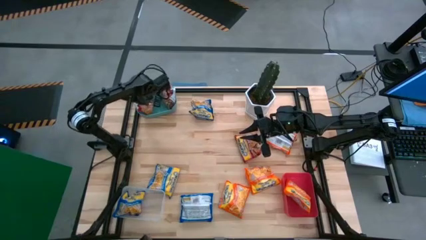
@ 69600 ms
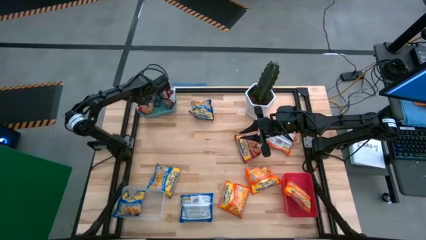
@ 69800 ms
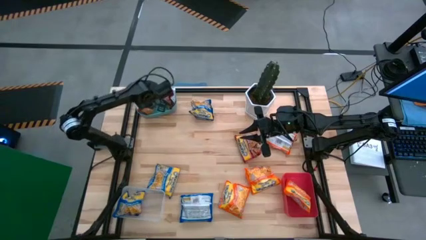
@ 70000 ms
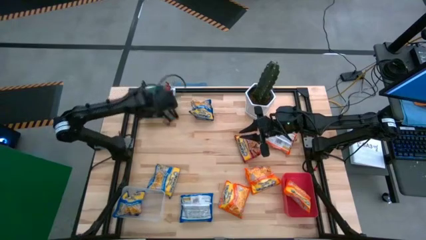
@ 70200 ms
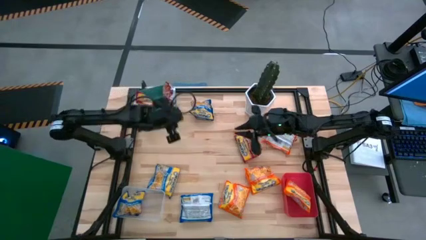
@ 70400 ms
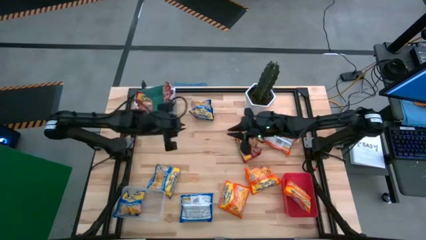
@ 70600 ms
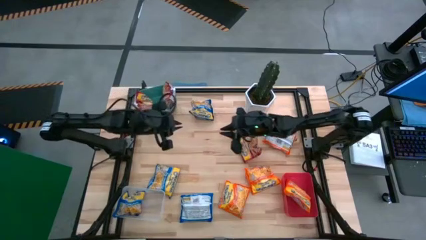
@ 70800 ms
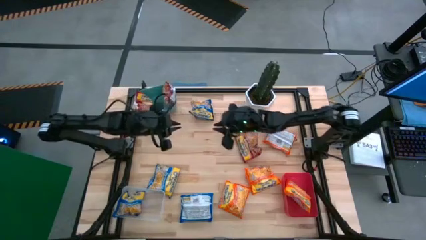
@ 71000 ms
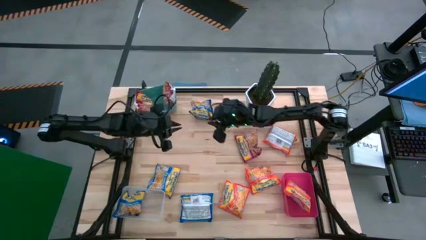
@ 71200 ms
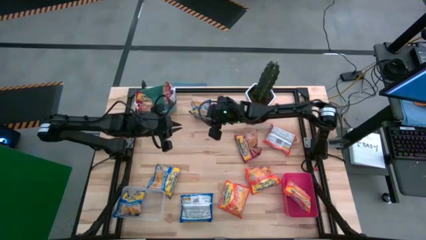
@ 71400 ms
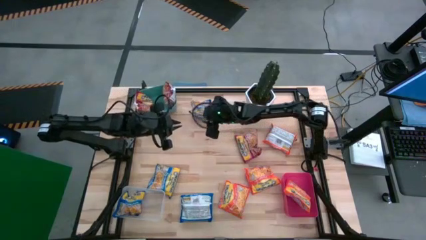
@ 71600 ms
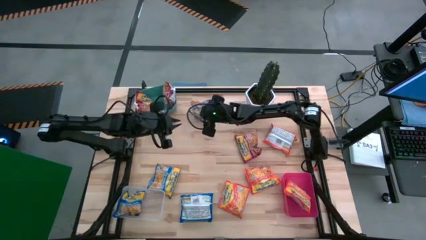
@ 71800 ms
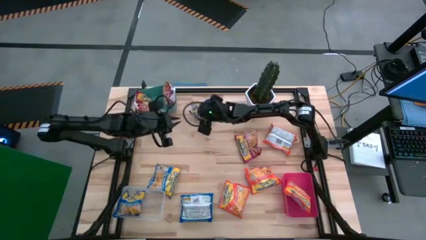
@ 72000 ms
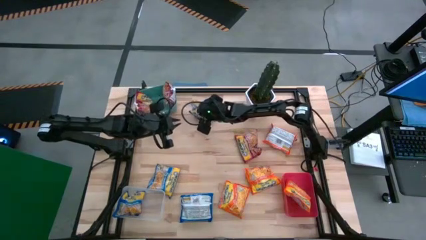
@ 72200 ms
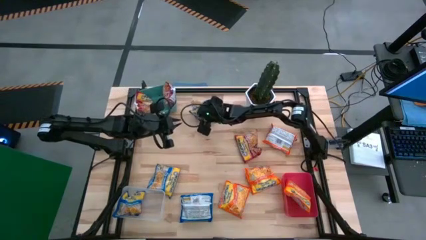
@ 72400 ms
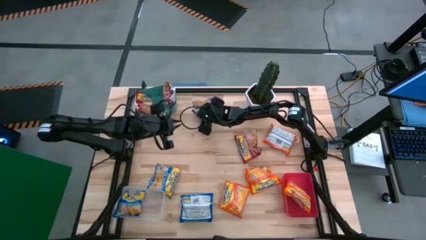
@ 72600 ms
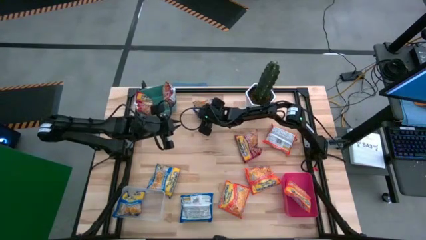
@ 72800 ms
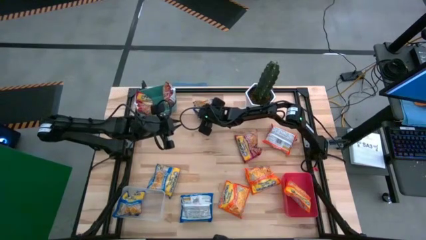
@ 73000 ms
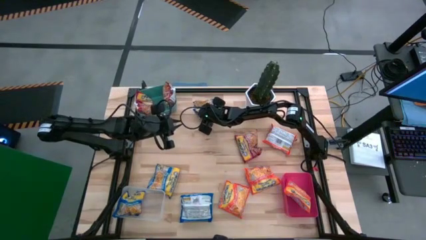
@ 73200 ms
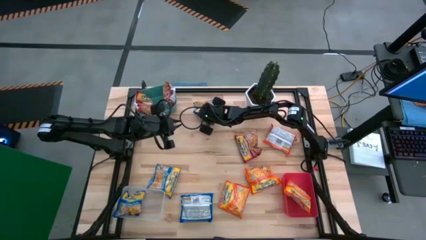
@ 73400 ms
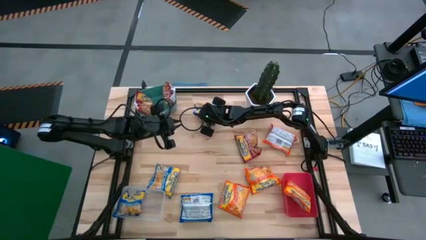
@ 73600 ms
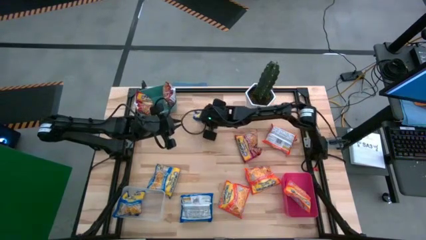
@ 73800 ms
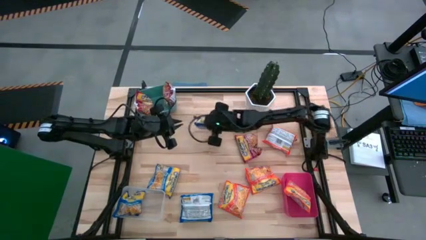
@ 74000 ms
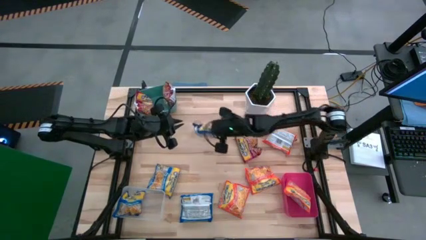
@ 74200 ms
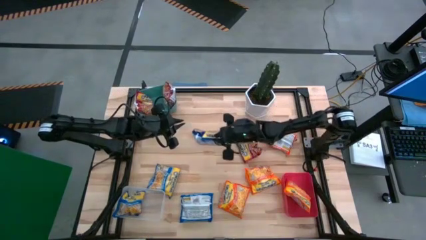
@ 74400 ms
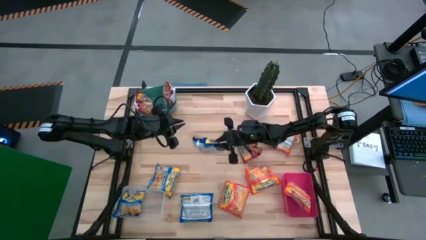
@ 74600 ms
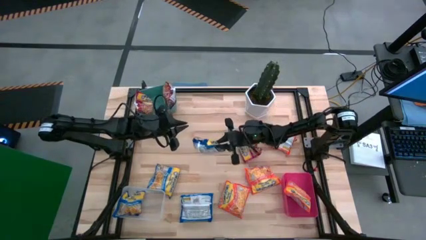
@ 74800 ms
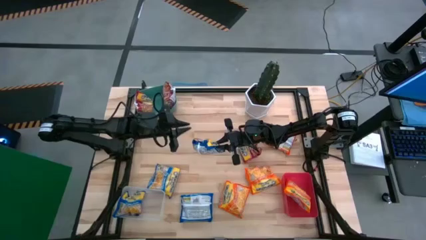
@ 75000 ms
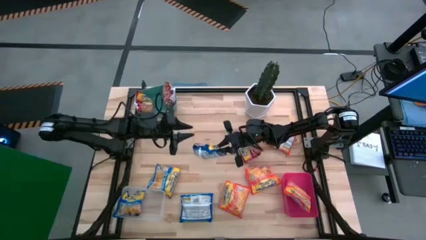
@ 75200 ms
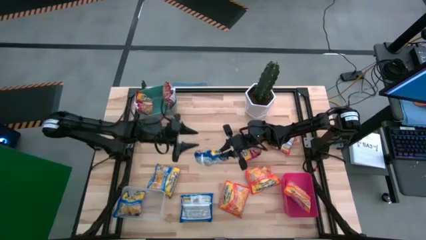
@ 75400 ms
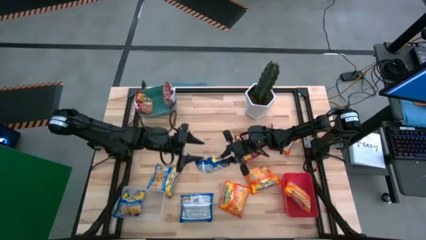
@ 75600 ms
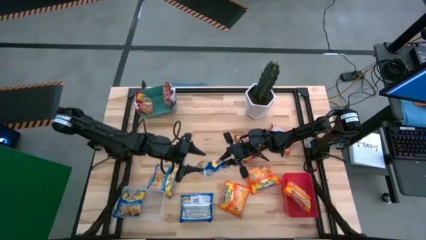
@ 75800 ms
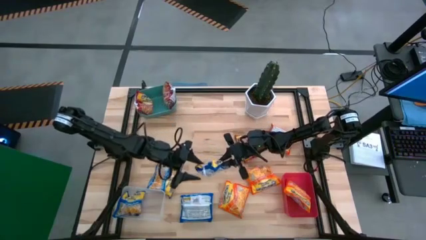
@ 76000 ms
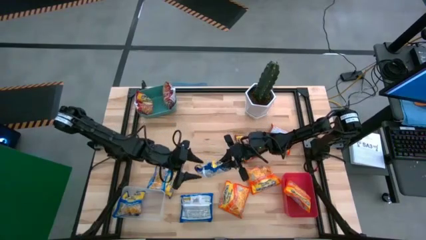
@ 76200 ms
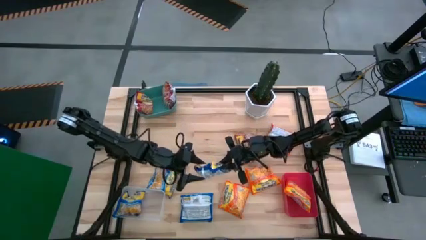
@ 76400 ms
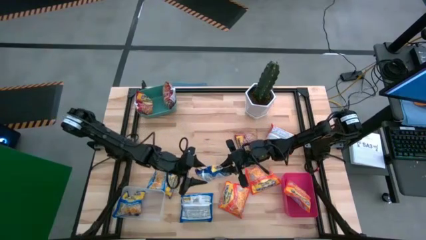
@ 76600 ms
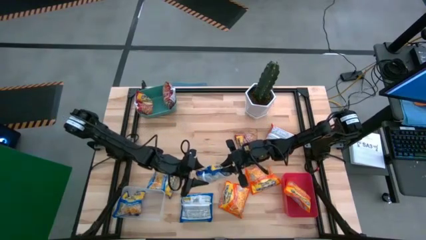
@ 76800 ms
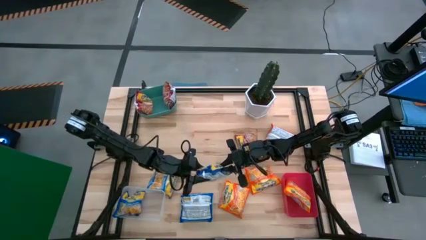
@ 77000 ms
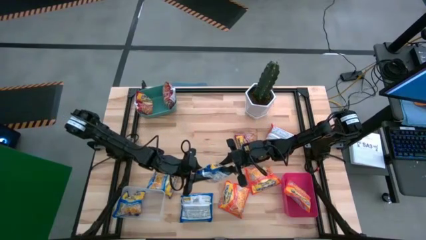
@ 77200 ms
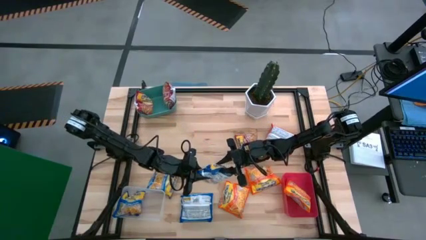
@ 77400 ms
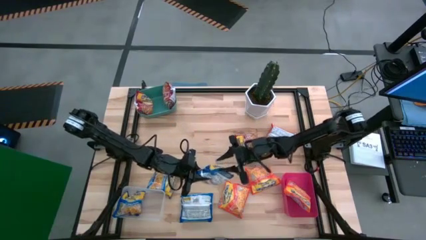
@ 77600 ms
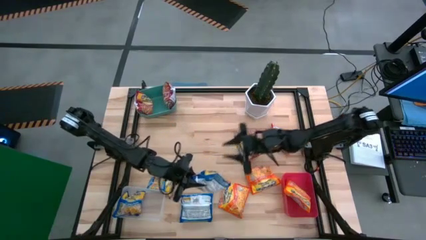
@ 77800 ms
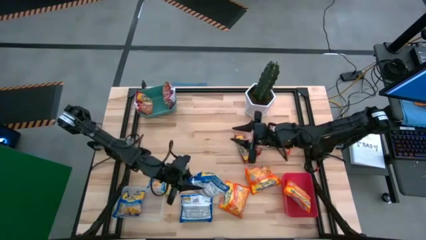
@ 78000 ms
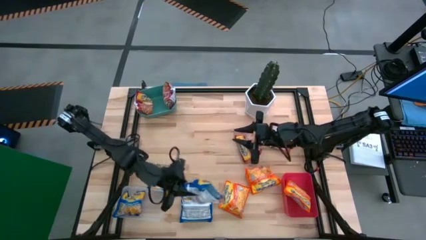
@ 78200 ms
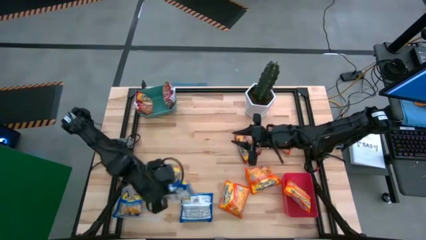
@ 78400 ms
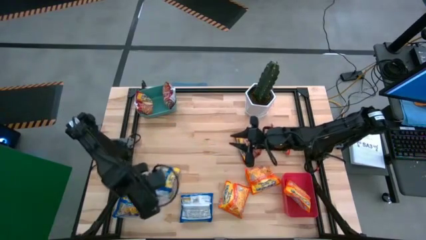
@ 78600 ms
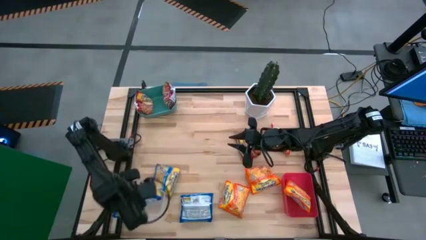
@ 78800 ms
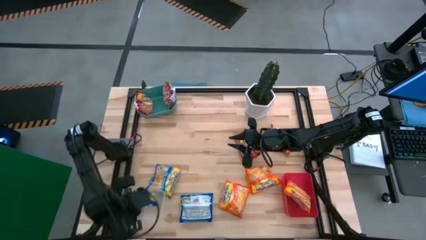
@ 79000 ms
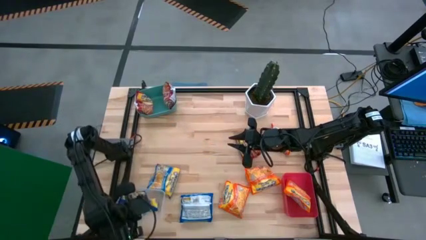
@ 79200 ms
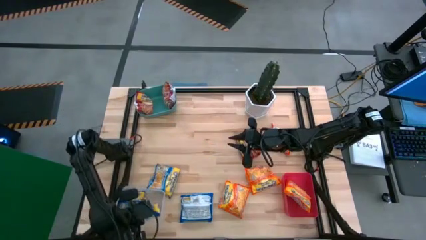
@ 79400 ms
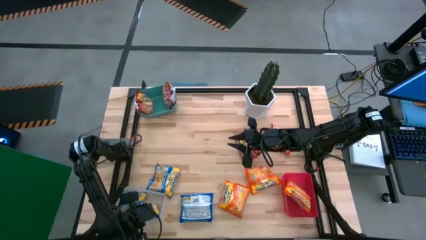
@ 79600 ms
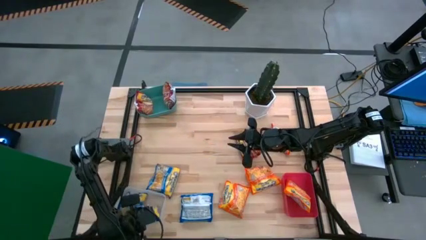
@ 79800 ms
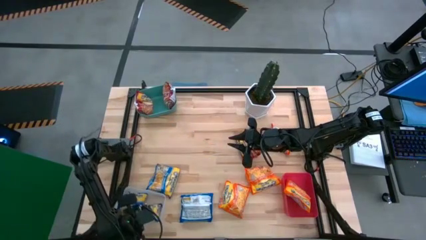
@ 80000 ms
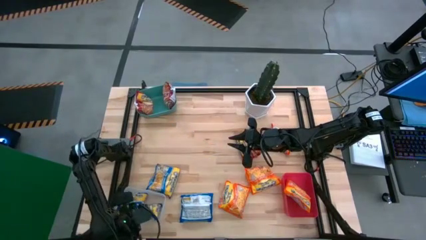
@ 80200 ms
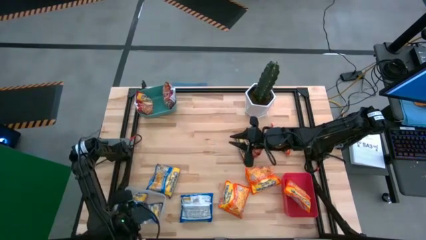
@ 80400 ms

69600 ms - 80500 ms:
Task: Sort Maruchan noodles
Put the top blue noodle pack into the transparent bin

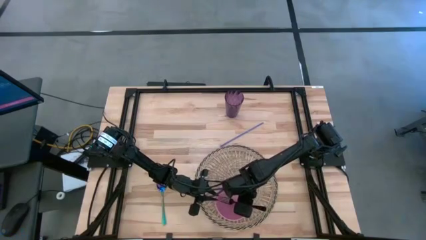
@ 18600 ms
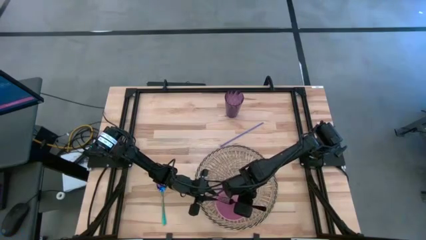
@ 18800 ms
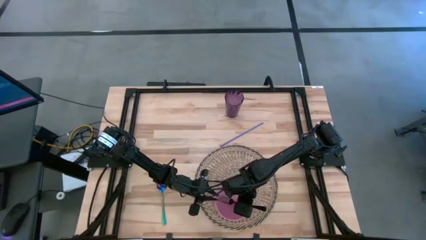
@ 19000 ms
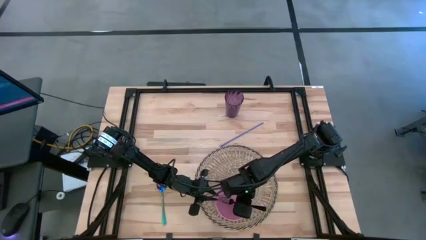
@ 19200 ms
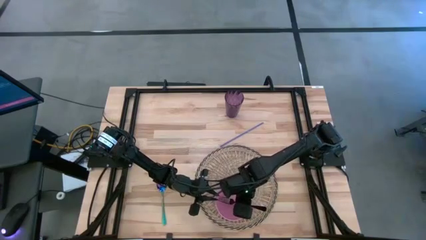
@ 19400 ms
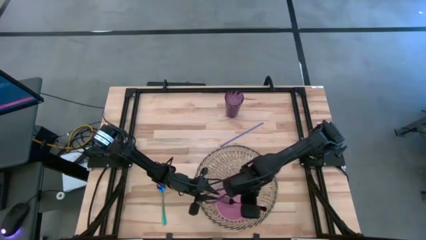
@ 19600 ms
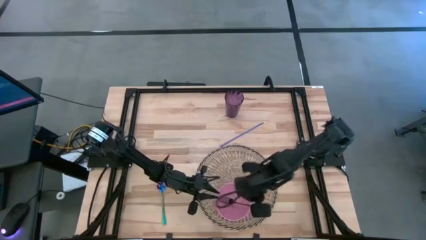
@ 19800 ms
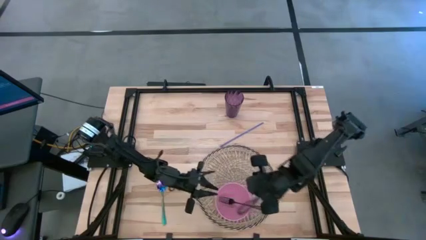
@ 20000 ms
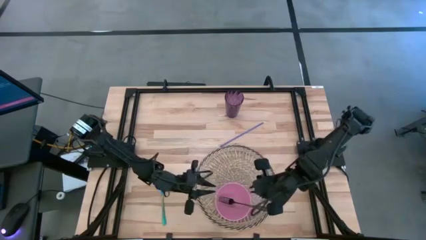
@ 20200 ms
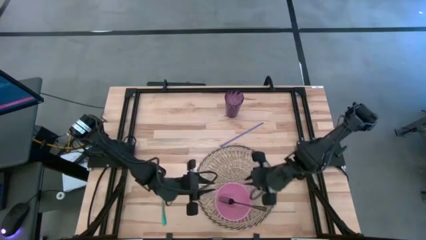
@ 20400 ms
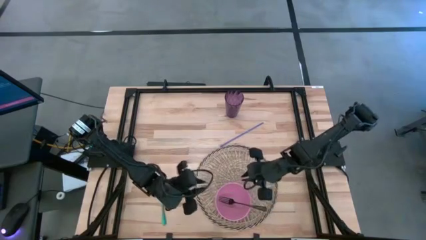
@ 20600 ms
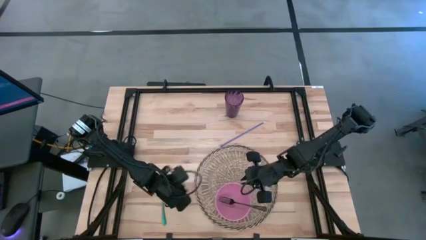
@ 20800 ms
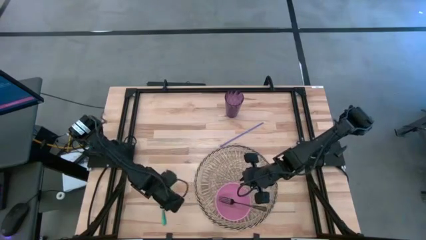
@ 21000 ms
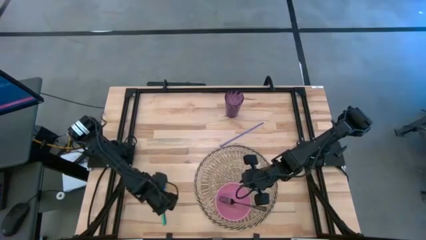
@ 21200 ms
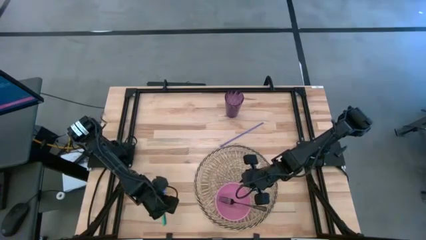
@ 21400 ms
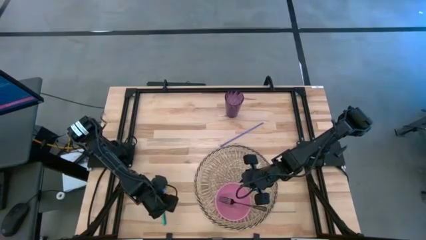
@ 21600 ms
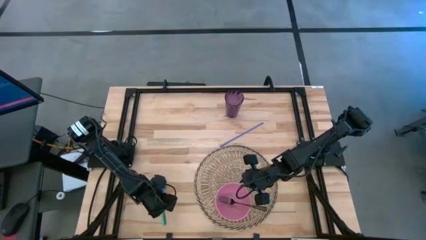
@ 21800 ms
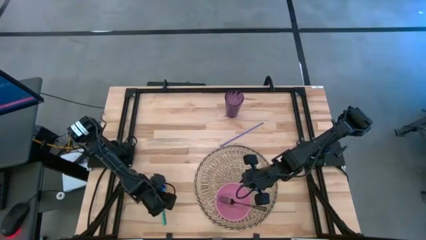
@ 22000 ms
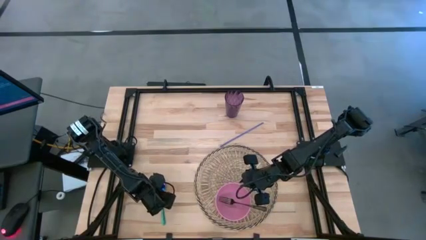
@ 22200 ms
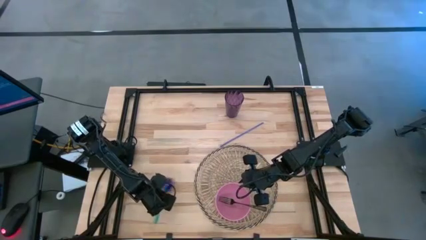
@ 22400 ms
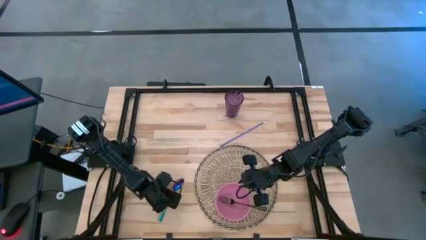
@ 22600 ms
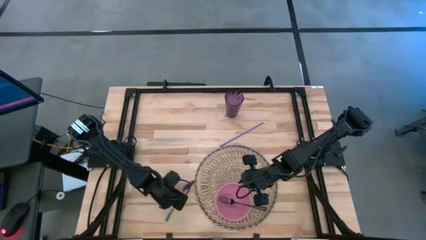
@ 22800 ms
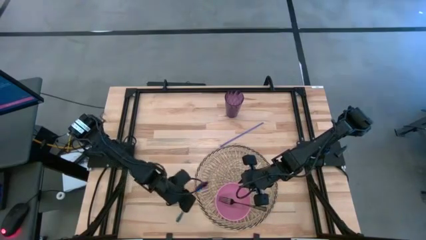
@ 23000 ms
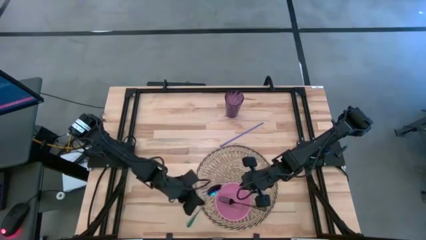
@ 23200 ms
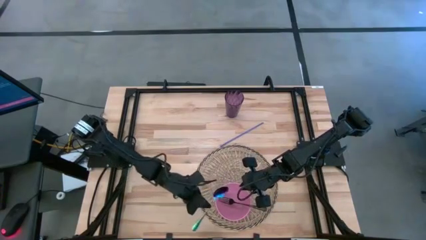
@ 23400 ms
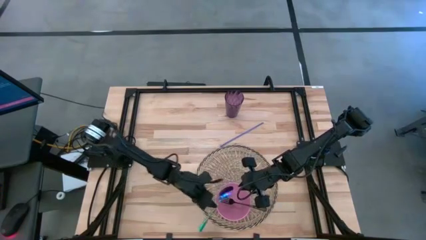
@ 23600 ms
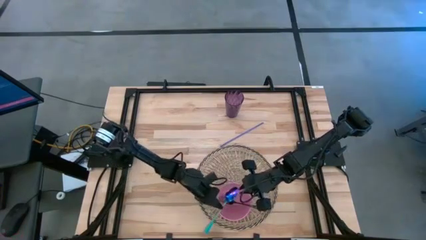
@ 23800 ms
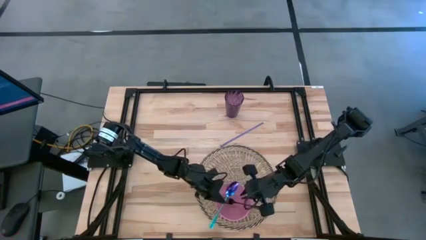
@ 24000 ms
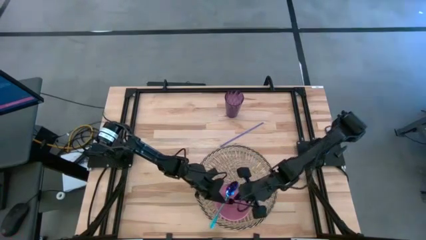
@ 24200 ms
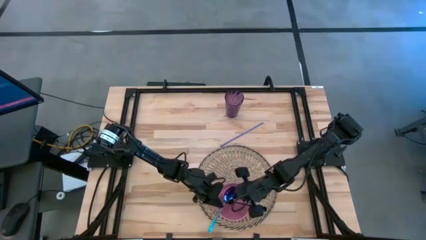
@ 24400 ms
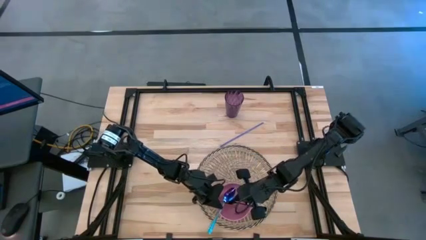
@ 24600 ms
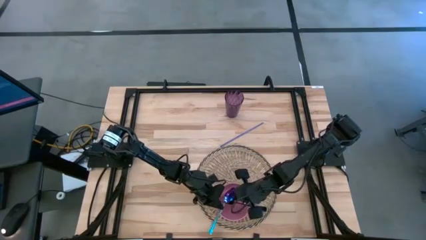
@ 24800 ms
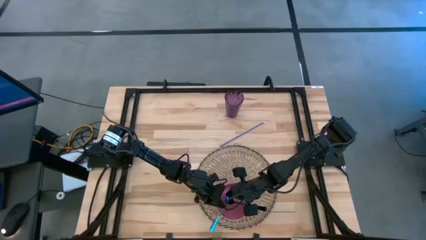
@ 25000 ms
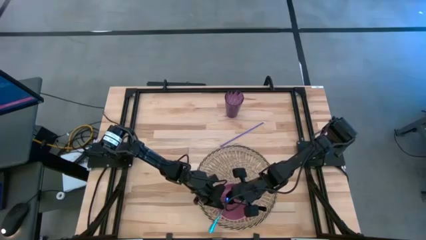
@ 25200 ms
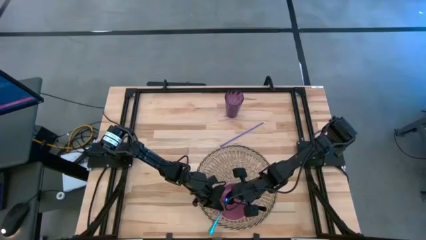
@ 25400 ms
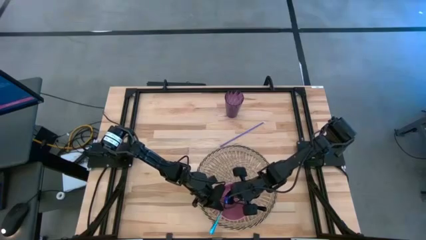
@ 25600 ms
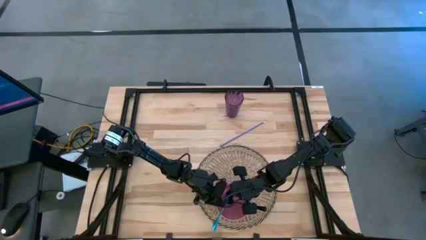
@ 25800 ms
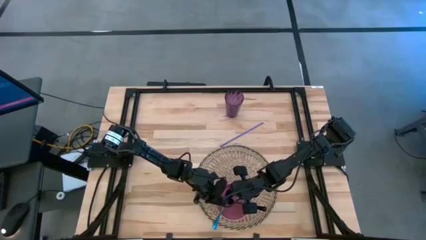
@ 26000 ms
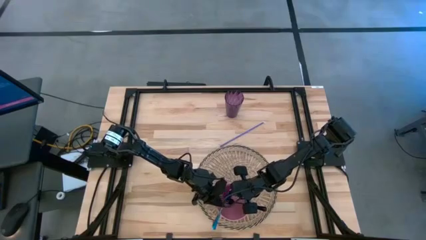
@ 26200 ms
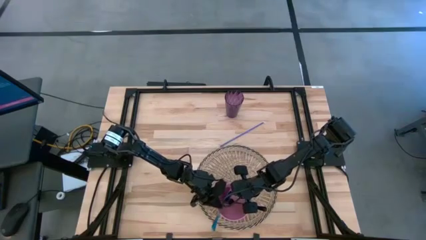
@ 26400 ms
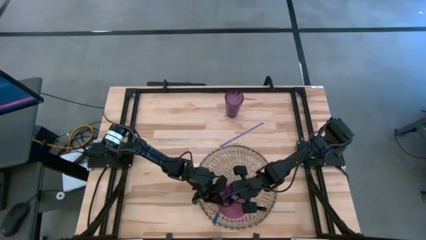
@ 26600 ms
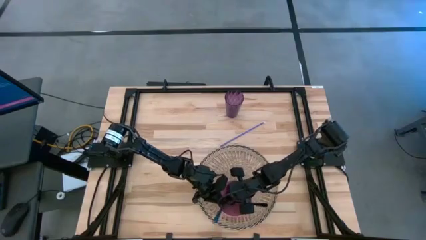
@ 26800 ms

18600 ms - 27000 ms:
Task: Pick & Place Utensil
Put the spoon into the pink bowl on the woven mat
